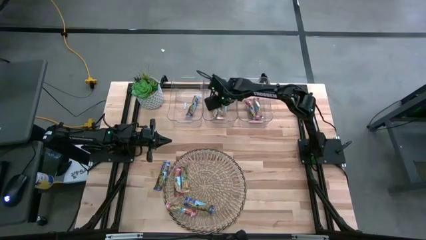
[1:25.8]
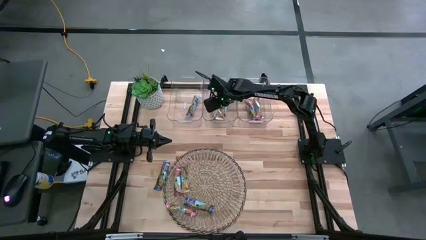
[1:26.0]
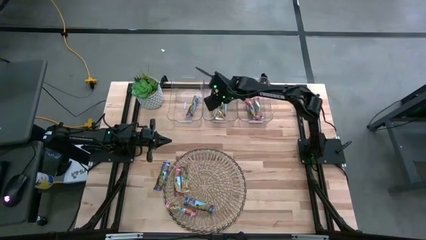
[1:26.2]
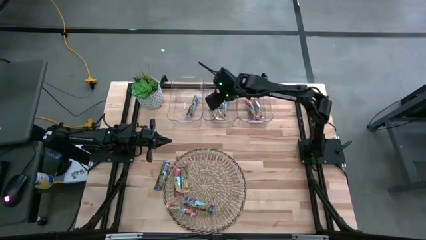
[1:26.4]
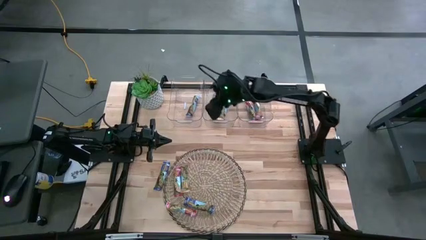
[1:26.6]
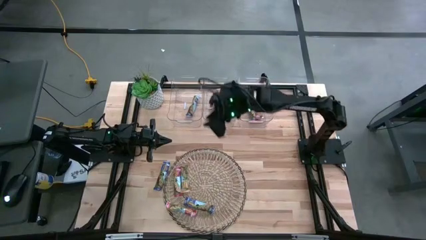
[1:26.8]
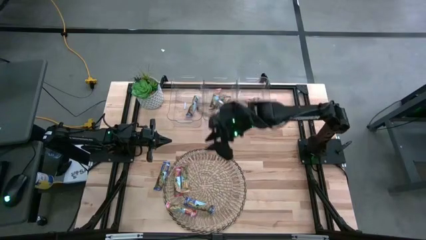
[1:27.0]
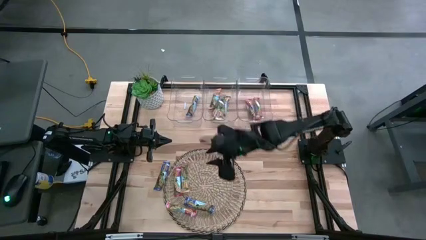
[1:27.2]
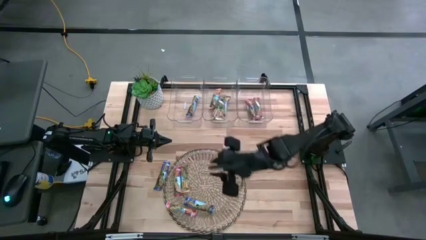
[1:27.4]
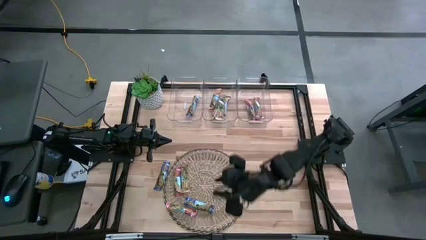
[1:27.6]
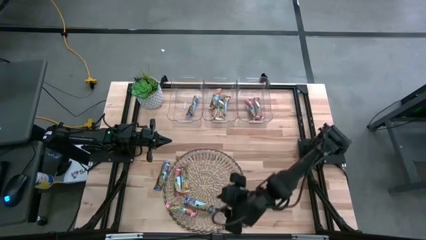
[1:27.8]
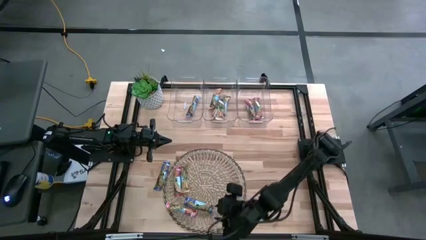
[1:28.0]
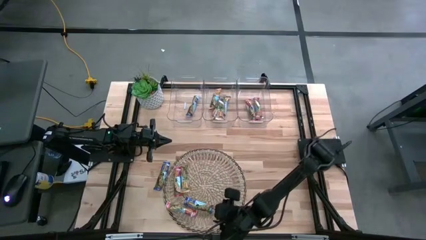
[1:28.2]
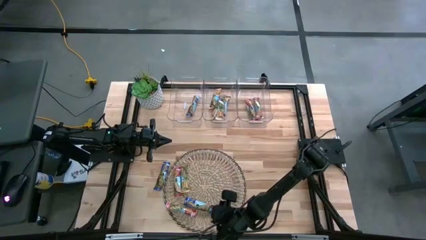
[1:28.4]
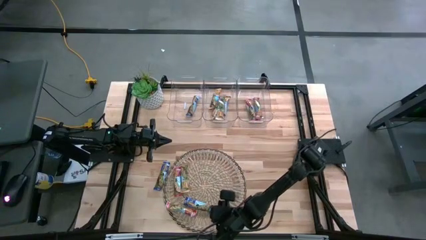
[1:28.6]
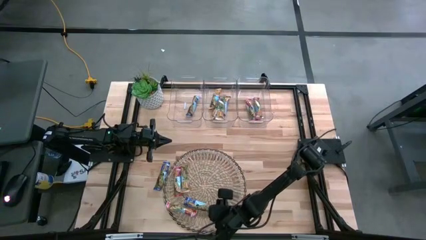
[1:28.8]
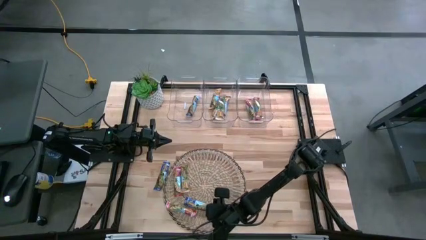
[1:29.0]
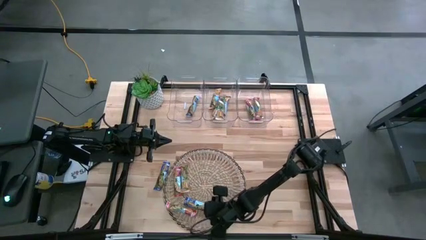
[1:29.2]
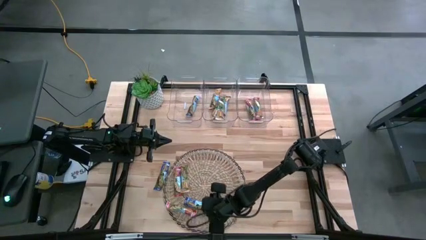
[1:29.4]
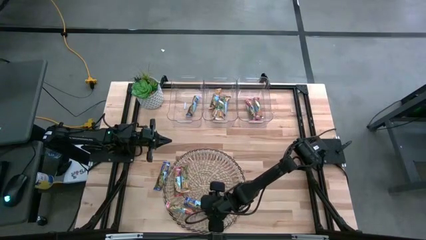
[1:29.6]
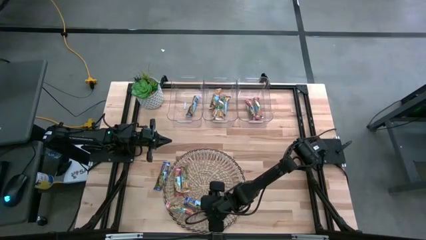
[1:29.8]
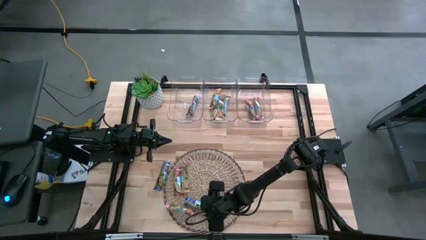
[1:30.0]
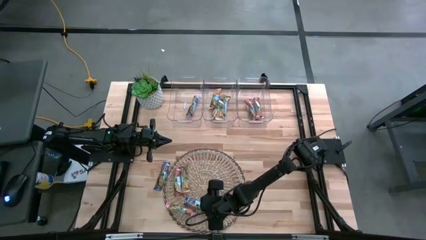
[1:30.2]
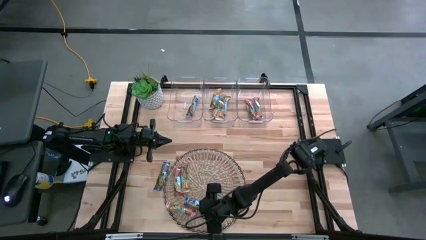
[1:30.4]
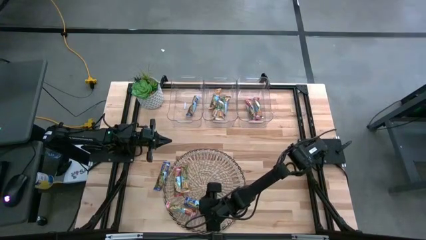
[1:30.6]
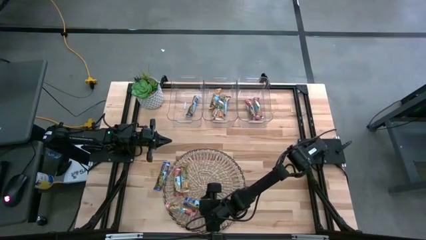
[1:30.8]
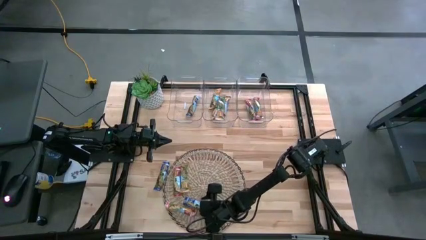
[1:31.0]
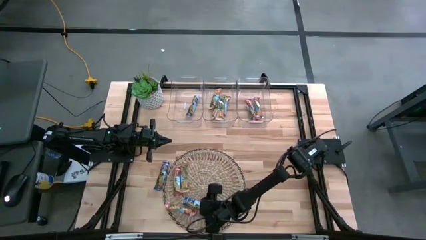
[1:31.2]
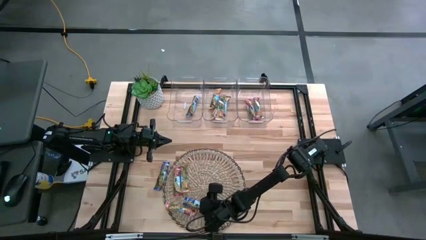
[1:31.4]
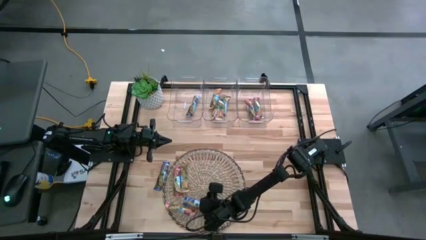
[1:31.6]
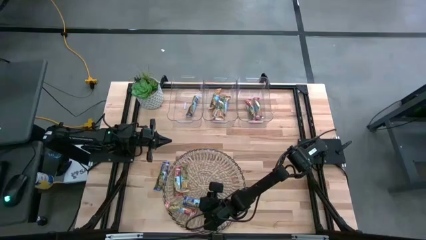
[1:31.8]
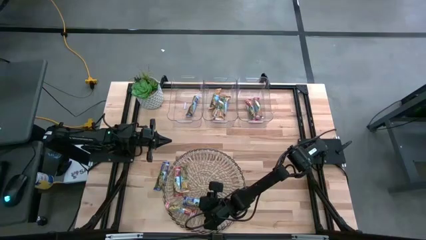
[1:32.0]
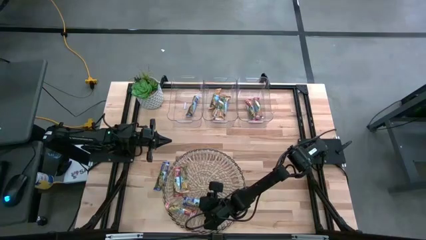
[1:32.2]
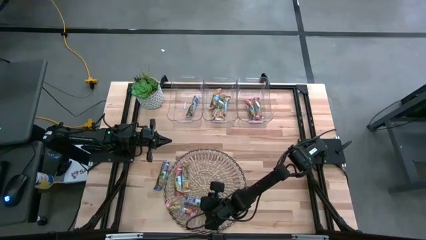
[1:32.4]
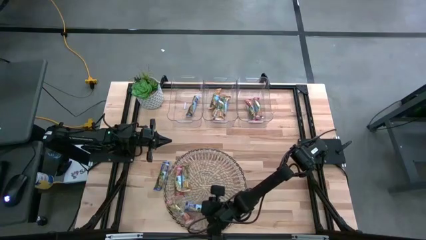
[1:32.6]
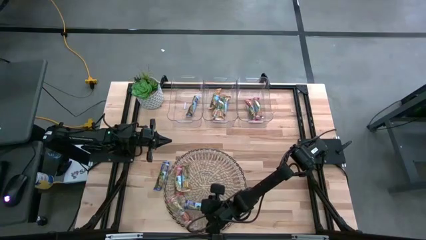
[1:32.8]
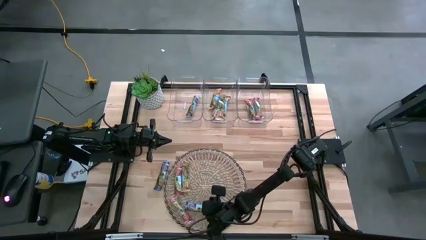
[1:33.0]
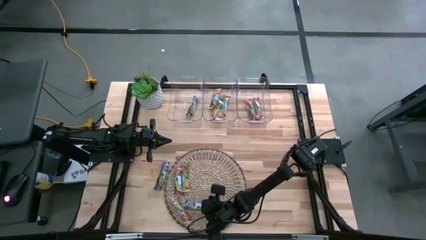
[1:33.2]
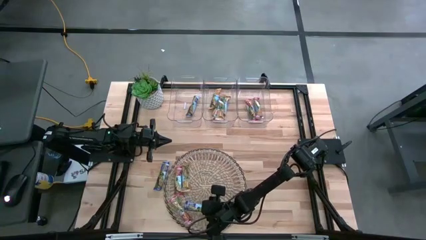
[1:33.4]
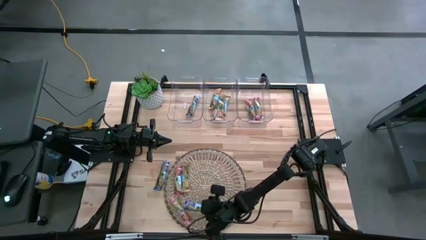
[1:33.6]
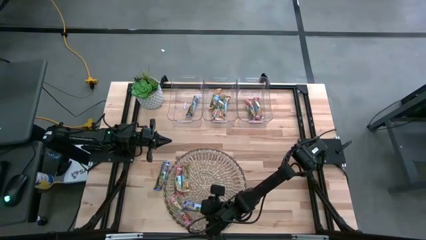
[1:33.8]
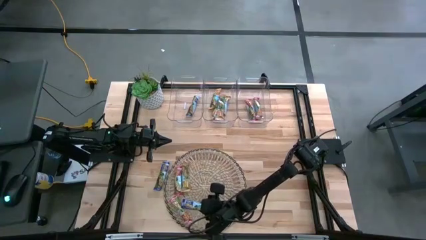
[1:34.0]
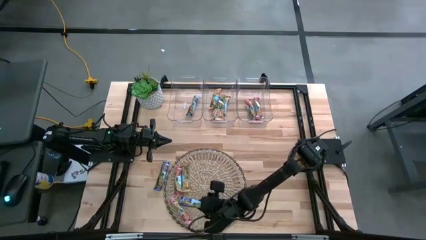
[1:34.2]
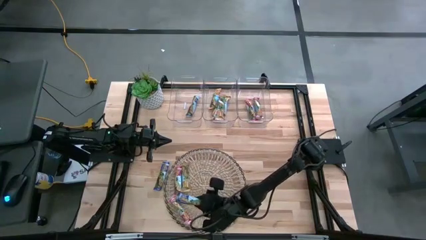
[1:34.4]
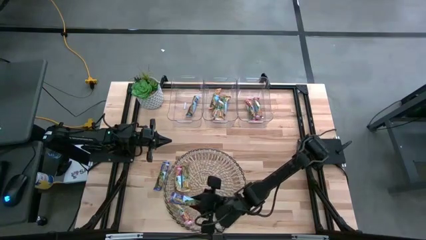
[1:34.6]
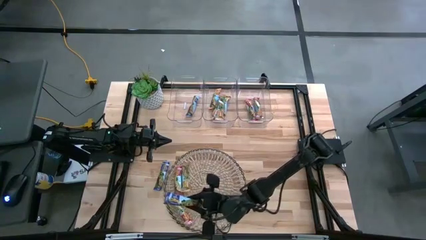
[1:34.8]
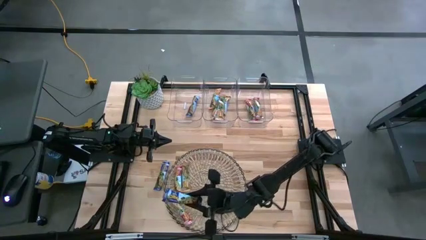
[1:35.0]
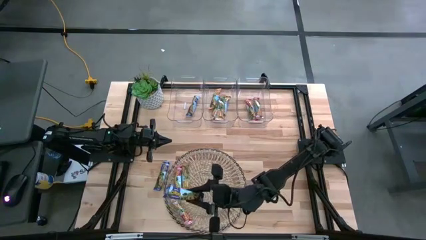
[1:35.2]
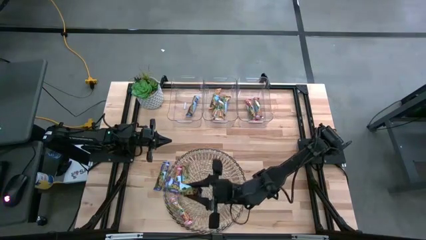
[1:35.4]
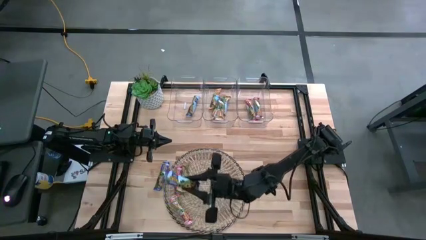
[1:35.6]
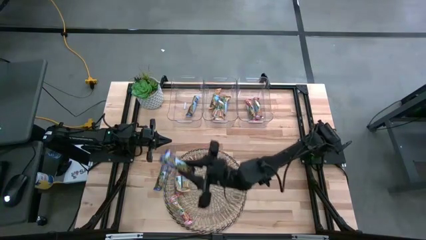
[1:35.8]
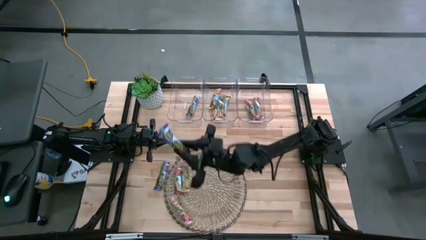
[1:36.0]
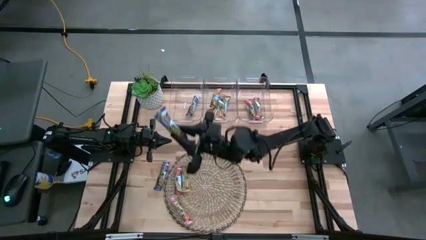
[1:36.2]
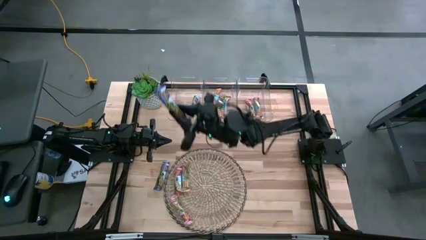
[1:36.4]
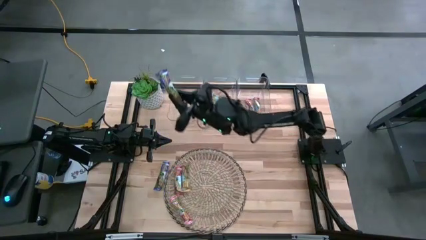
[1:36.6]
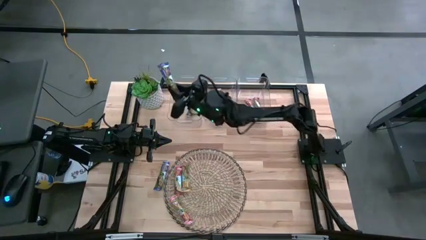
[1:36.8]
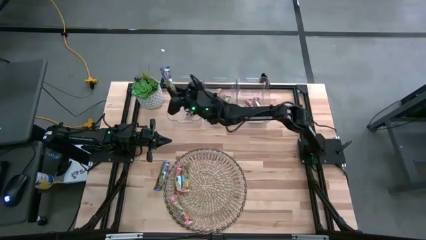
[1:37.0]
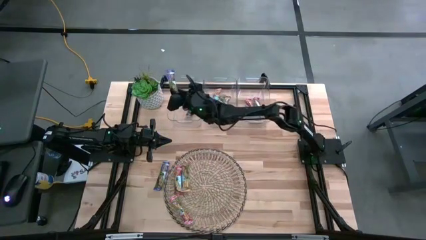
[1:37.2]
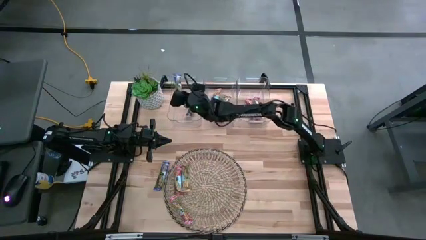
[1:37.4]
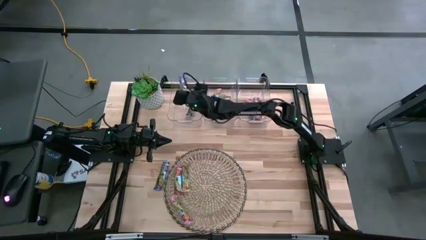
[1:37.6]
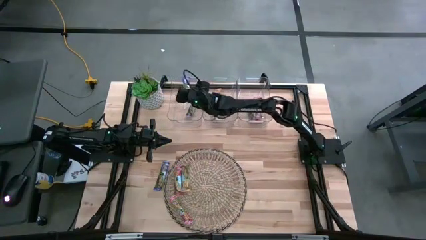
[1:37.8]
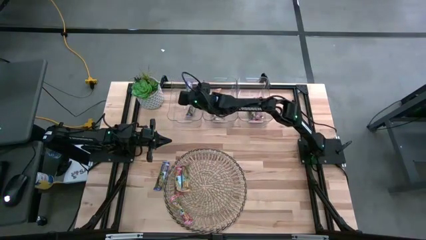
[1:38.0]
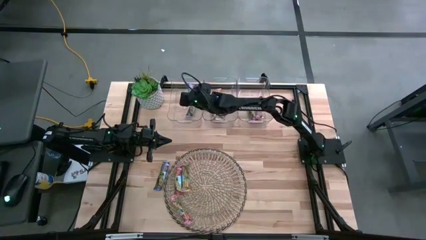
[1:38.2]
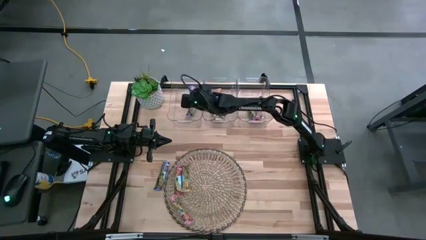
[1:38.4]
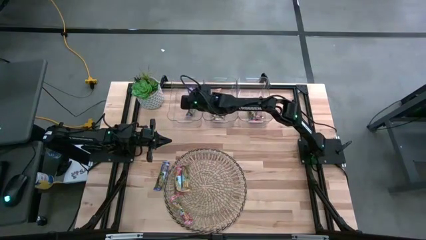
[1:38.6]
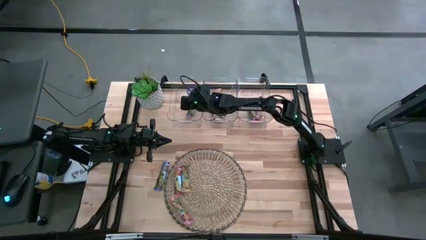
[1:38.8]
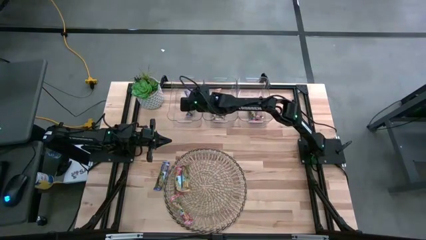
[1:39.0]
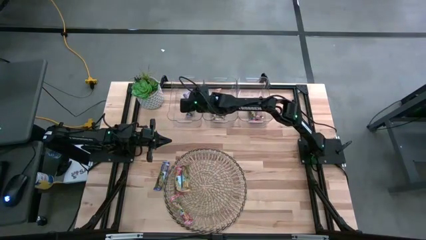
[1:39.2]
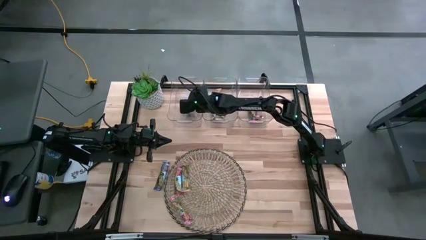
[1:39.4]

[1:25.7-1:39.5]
Task: Pick and place Granola Bars by type
Put the blue granola bar into the left transparent bin

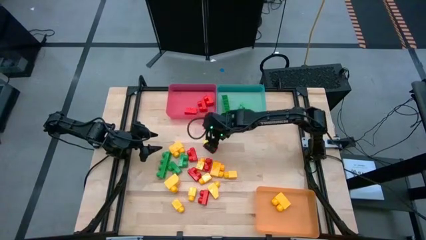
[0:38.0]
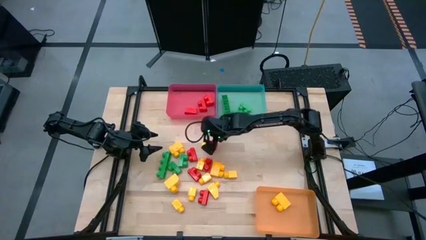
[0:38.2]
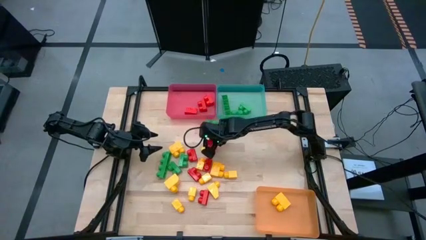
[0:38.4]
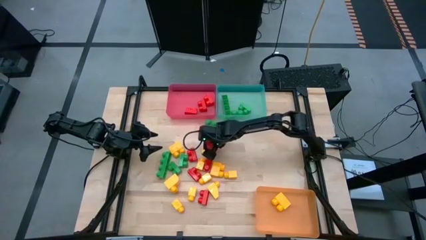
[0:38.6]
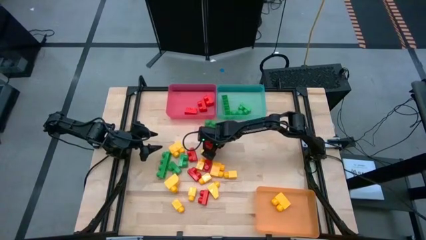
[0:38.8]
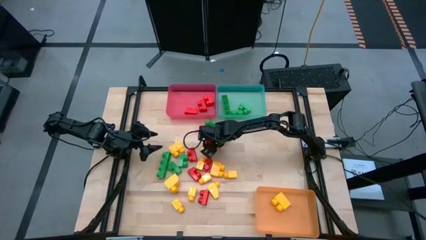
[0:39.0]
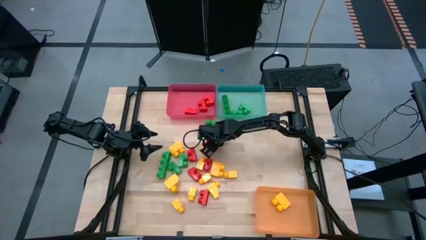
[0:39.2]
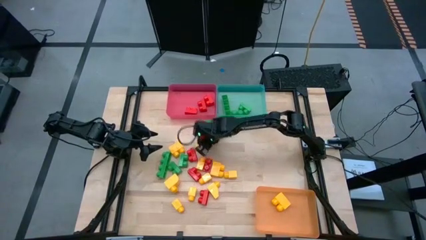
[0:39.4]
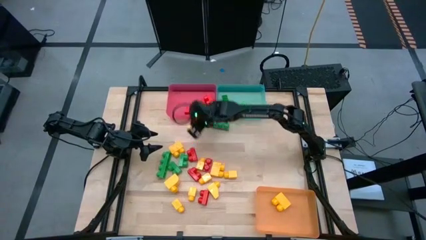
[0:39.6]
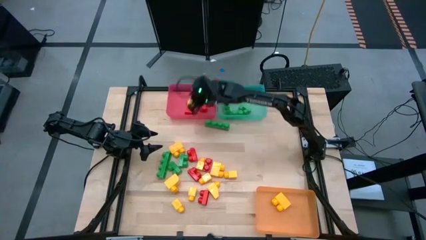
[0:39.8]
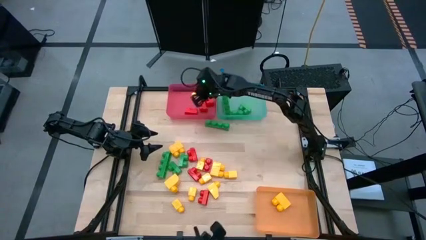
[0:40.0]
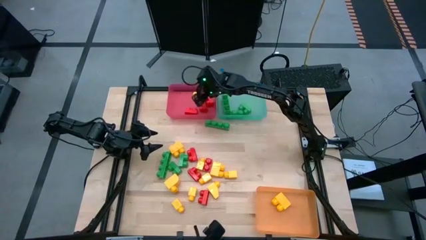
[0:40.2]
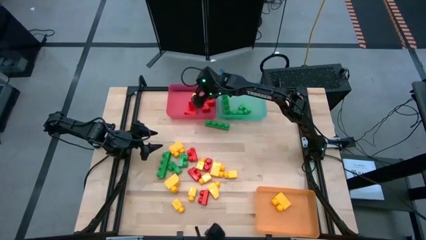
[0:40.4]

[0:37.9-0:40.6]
Task: Sort blocks
Put the red game piece into the red bin
